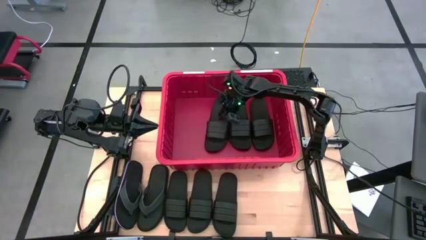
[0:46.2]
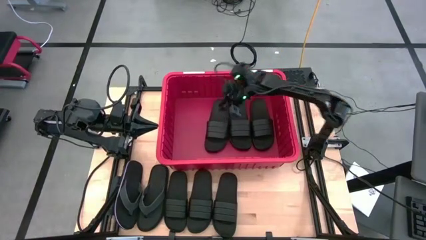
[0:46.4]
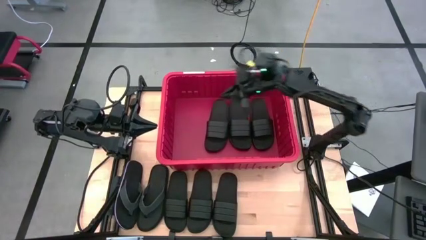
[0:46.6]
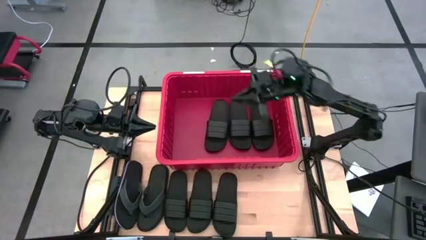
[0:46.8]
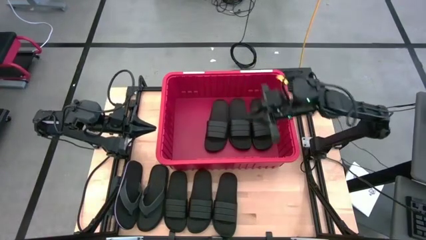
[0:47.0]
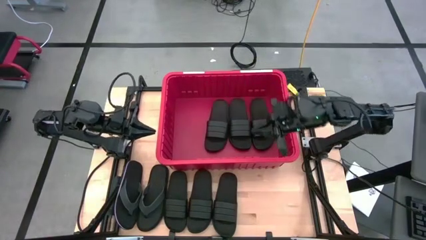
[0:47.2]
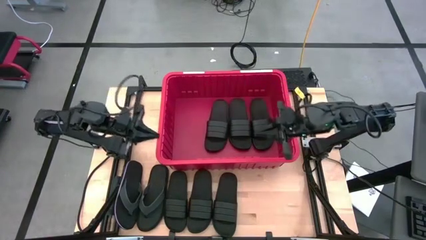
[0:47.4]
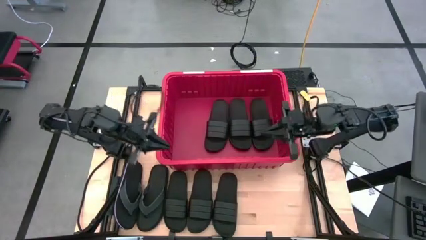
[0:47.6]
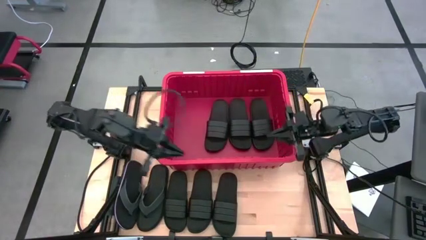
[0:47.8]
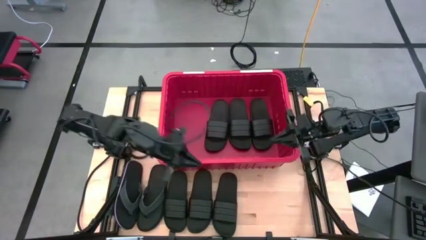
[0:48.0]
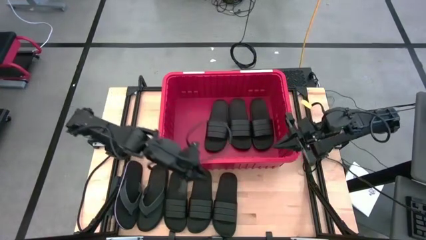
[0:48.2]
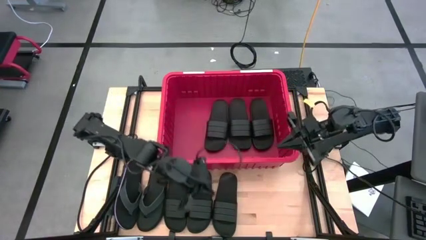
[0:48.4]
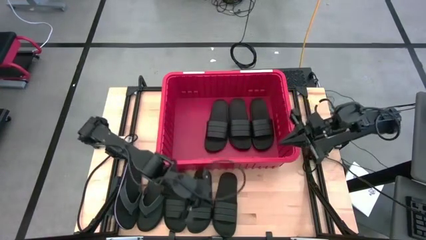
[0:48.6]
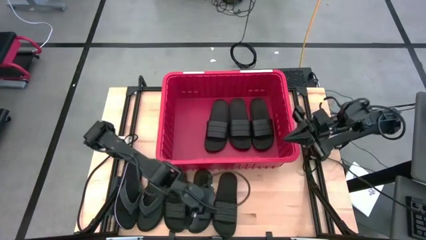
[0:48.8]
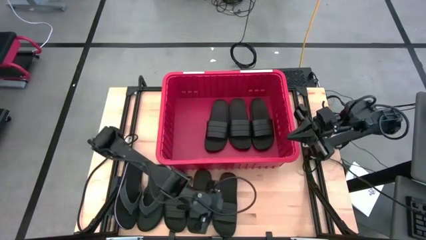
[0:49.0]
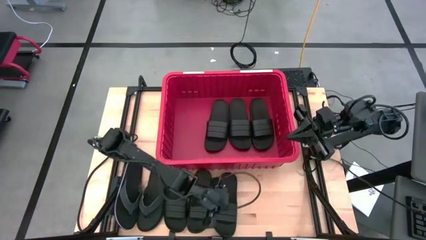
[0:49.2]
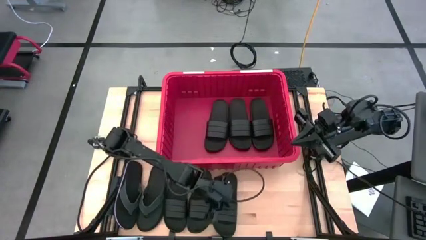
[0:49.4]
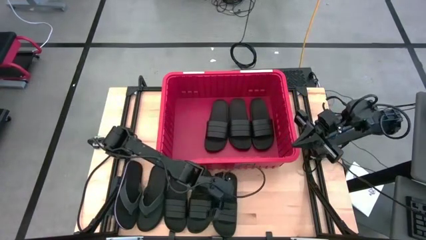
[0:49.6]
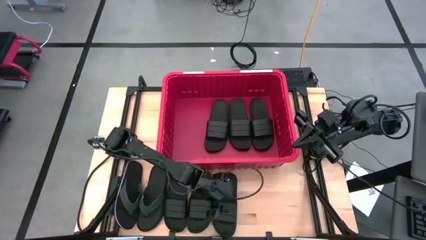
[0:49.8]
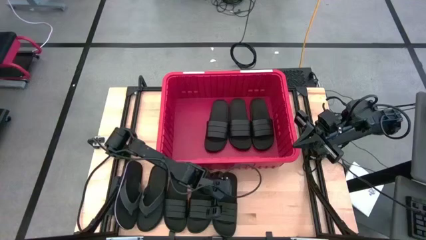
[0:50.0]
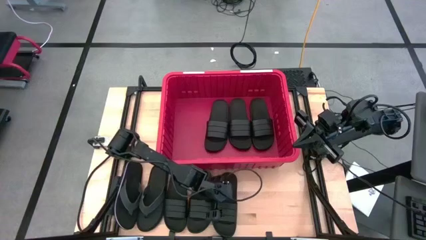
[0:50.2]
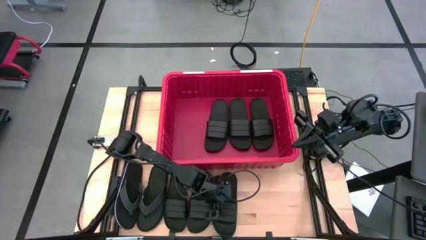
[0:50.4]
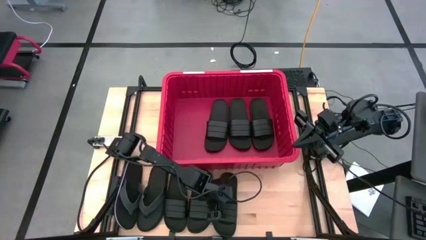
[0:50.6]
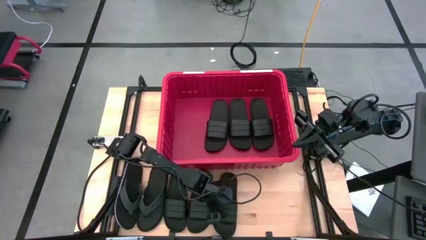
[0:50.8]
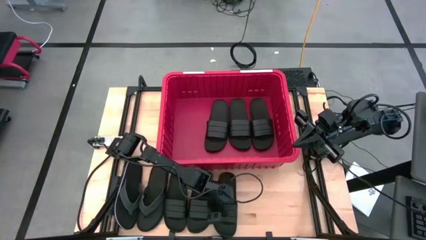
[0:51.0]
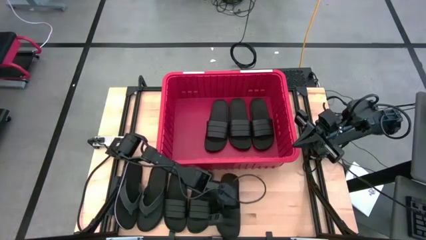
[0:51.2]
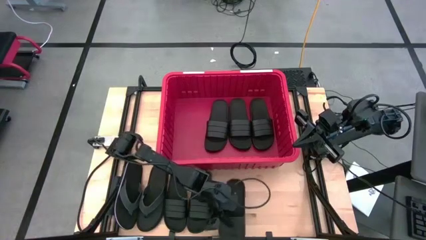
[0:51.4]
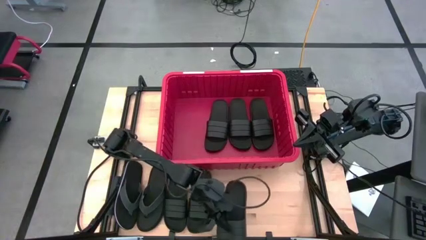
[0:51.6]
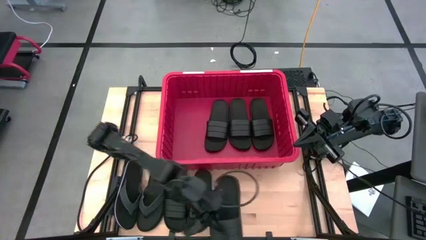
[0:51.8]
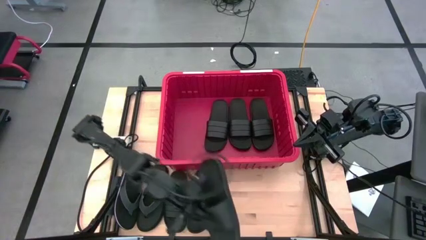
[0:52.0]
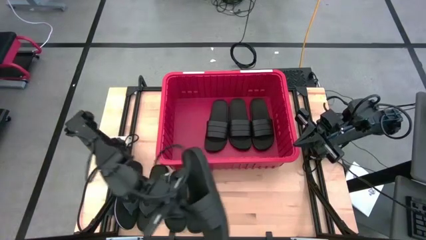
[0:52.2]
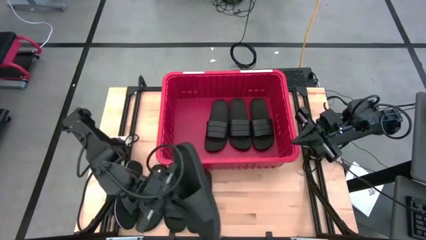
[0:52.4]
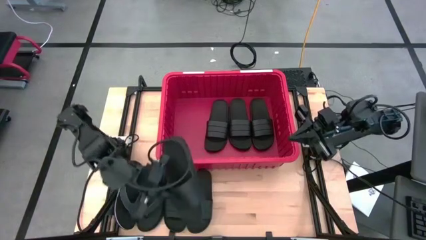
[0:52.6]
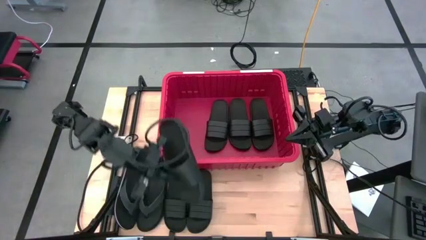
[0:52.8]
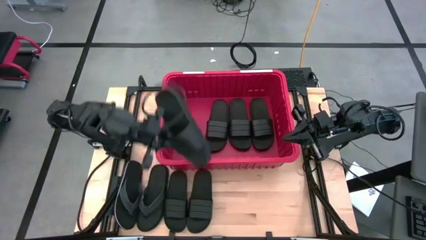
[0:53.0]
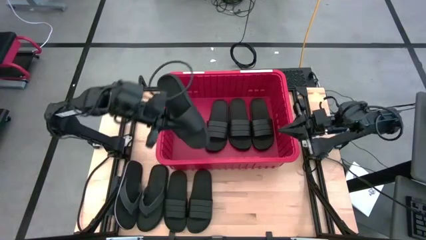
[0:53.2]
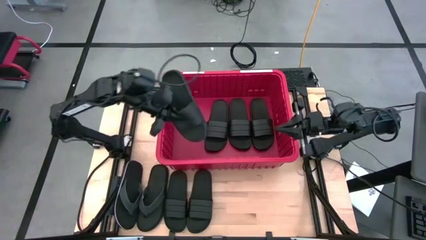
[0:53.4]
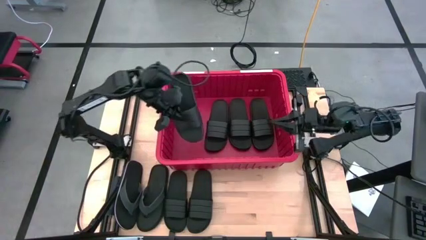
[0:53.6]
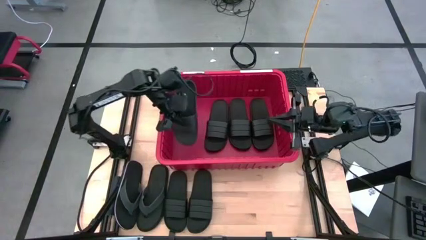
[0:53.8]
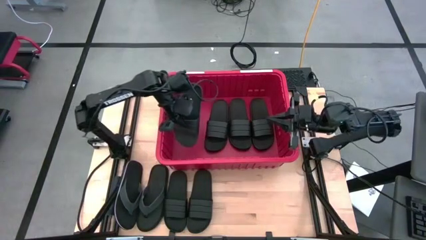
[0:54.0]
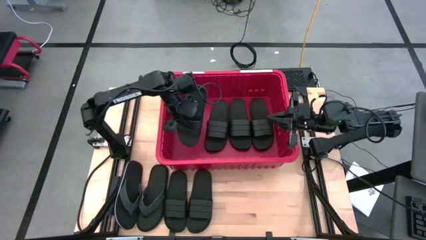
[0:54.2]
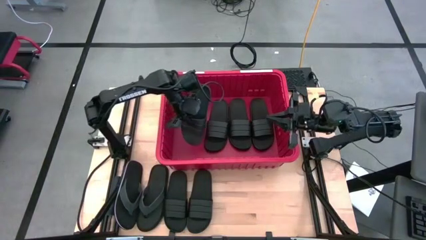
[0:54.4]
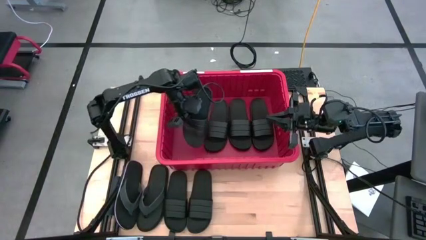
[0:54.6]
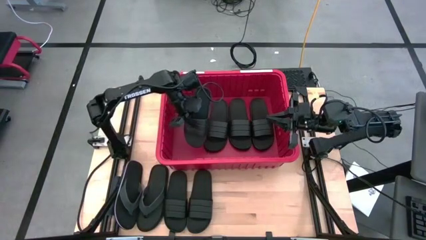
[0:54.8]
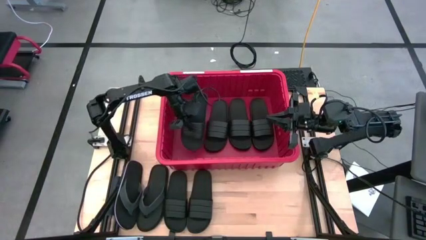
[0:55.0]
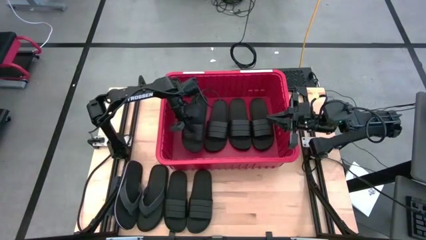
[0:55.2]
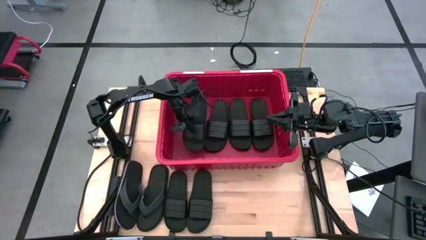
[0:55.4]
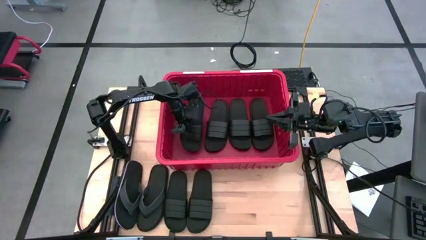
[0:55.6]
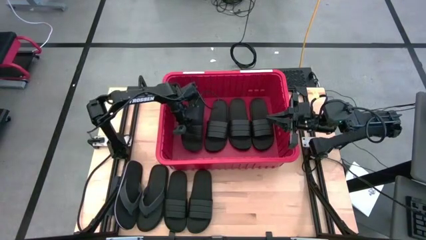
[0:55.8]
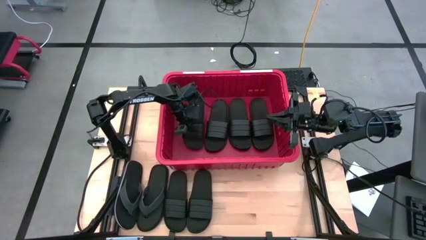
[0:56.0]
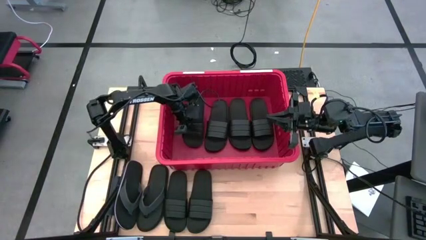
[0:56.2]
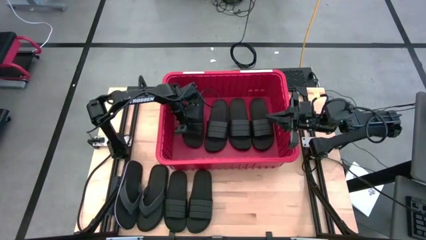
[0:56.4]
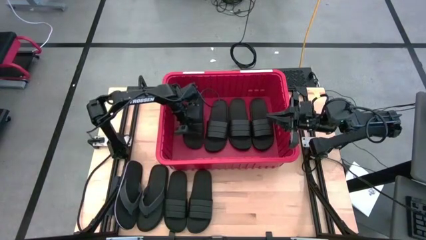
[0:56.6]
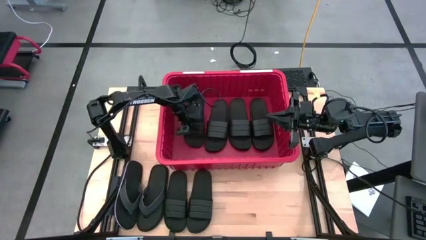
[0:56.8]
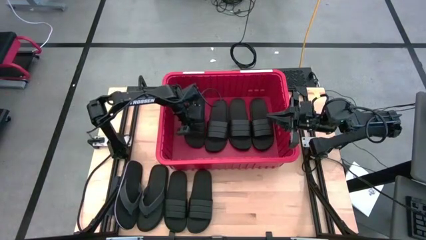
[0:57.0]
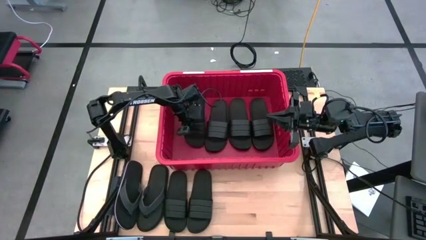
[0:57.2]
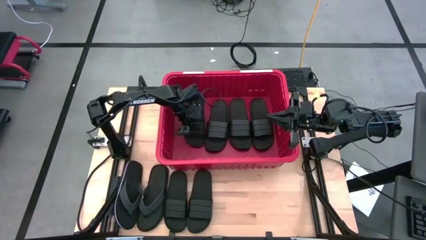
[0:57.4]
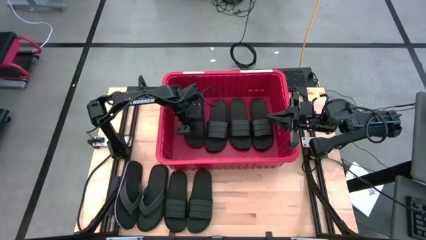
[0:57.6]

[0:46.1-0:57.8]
Task: Pick and place slides into bin
Put the black slide into the red bin

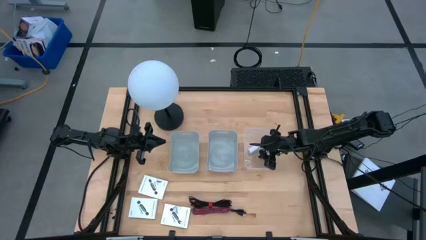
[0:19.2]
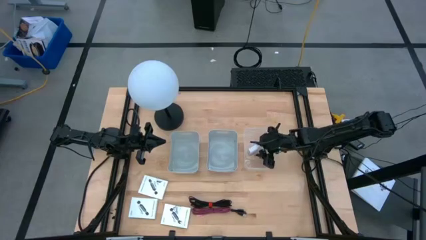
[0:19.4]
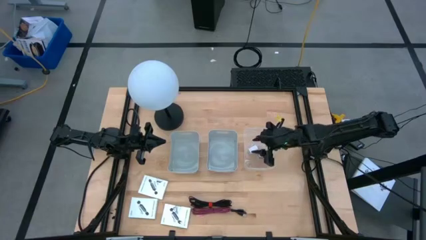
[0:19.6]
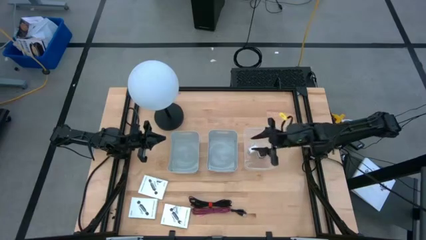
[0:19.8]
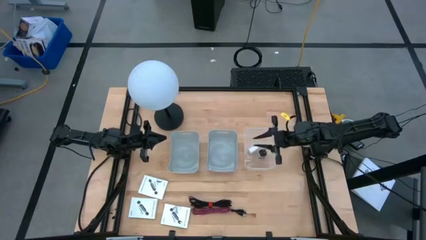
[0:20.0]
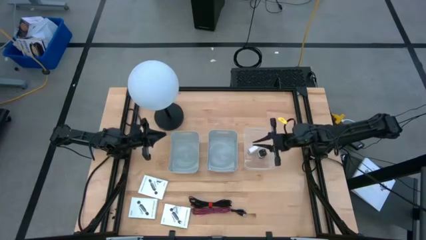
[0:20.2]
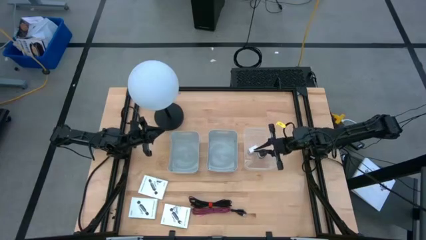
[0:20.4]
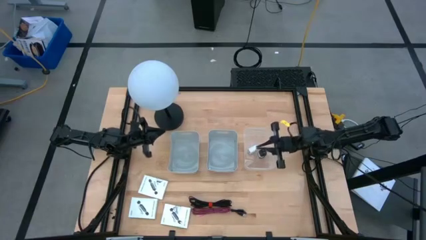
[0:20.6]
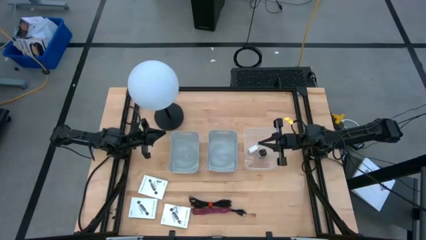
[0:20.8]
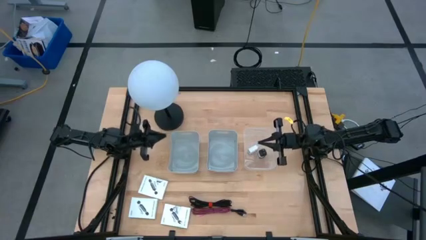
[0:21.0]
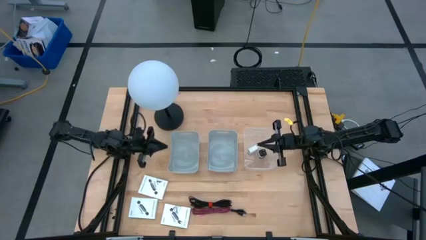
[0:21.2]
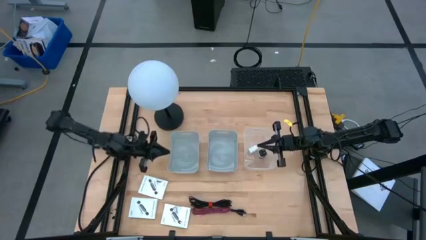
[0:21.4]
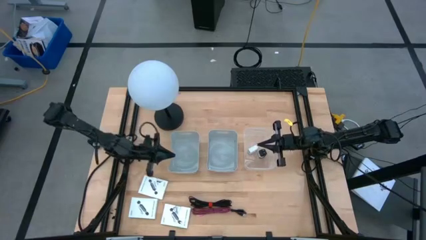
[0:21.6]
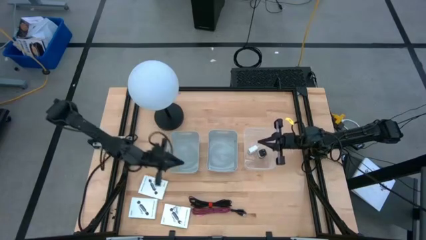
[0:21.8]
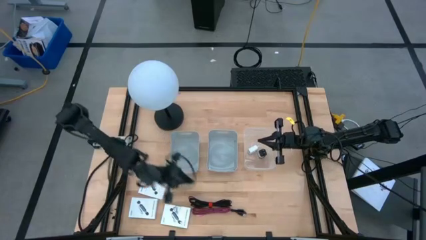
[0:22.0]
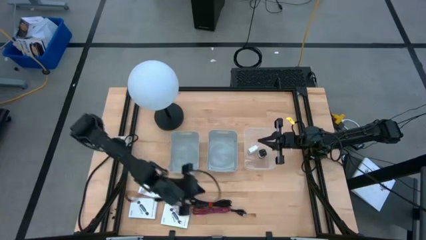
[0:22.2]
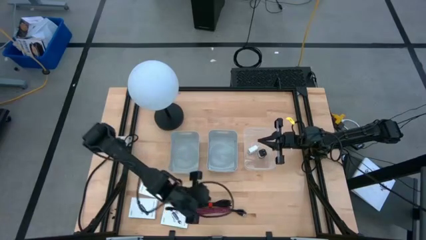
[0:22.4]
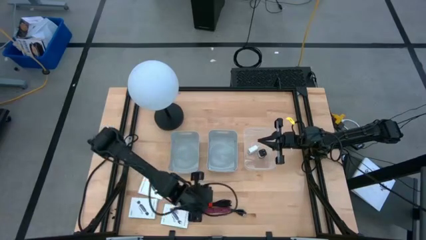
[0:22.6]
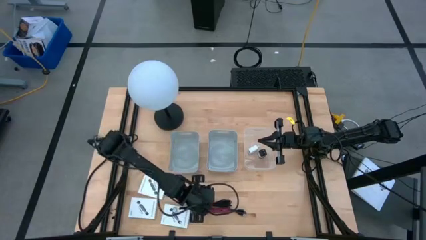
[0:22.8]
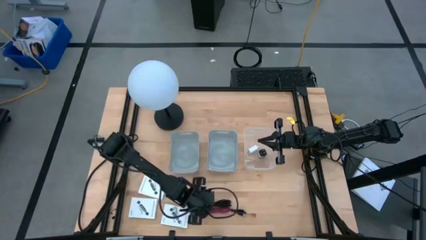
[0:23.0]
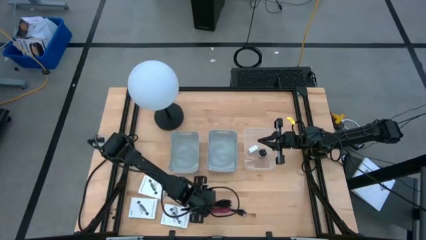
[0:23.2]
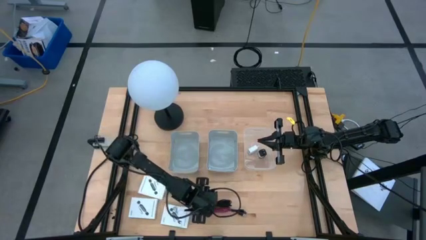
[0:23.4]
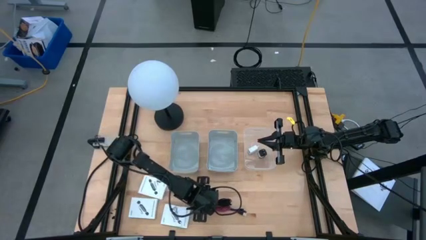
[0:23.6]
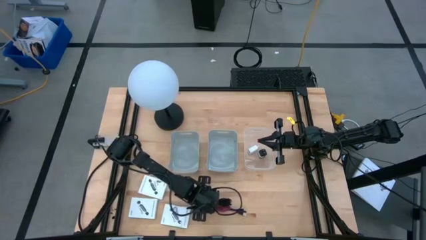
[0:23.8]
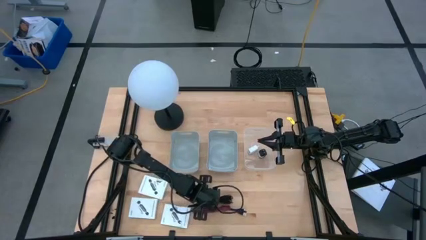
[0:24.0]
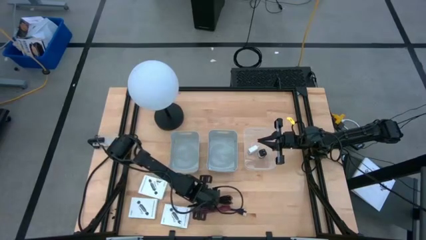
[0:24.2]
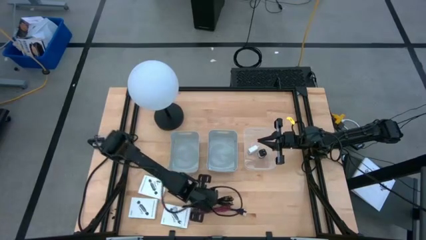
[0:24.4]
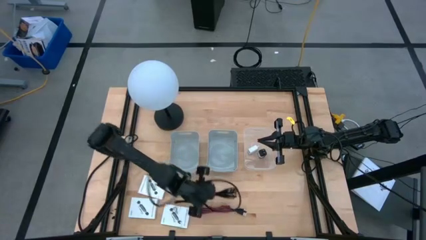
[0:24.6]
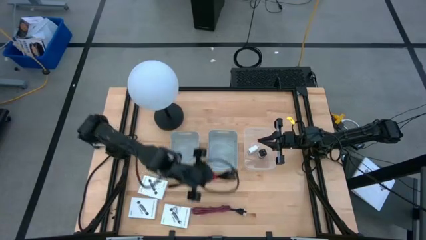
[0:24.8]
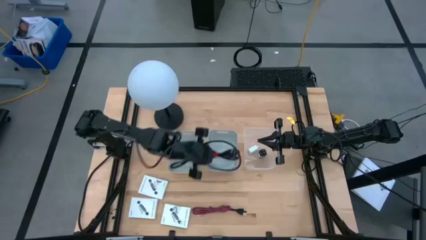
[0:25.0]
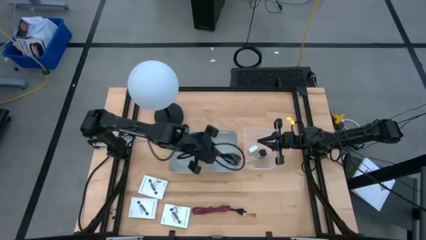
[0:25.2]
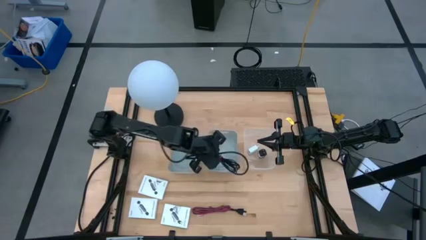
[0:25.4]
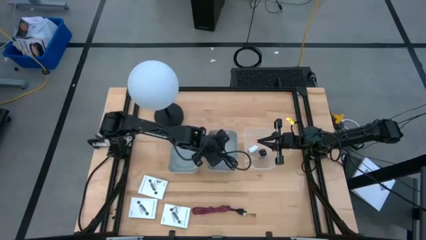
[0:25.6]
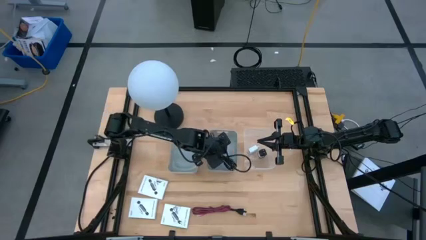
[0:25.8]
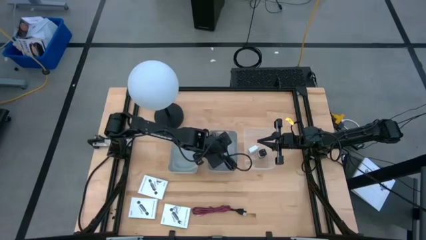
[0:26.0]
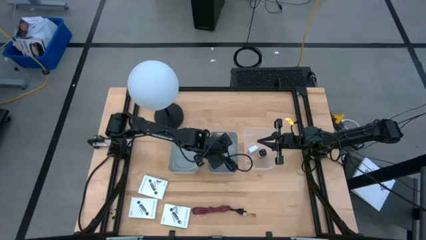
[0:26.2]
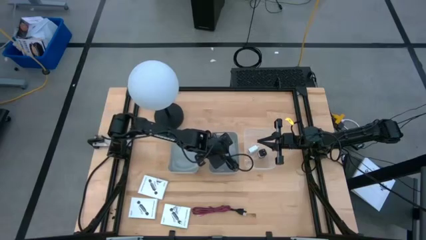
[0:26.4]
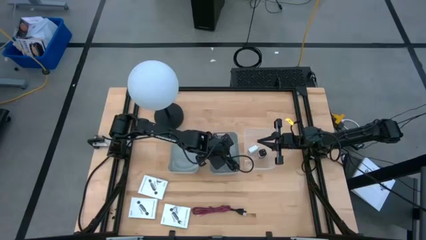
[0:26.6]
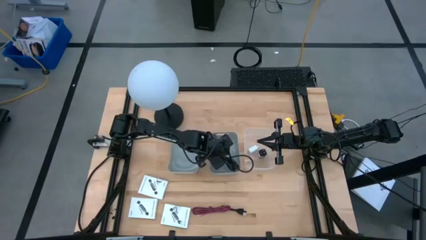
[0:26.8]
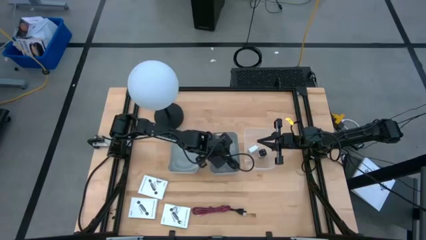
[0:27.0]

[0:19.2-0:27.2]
Task: Pick and place items into bin
Put the top black charger cable into the right gray bin
